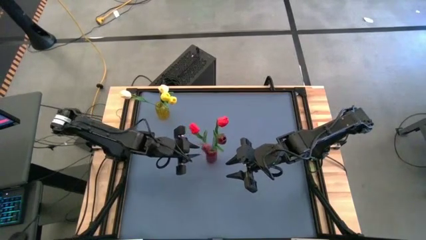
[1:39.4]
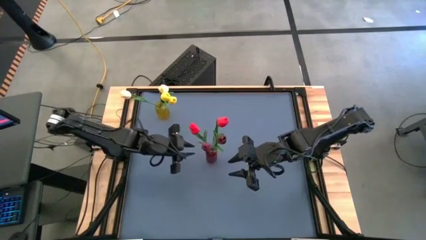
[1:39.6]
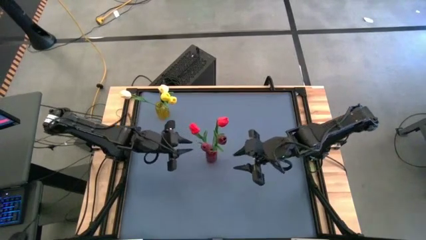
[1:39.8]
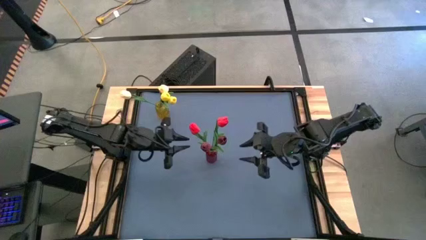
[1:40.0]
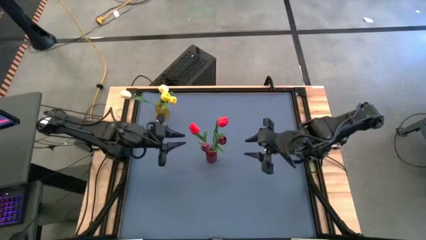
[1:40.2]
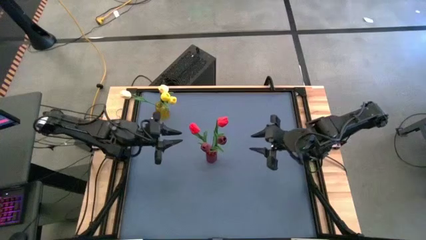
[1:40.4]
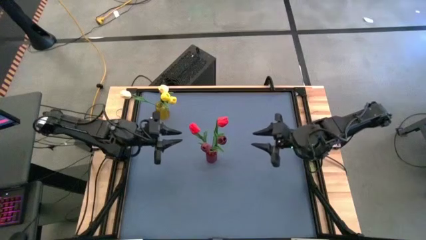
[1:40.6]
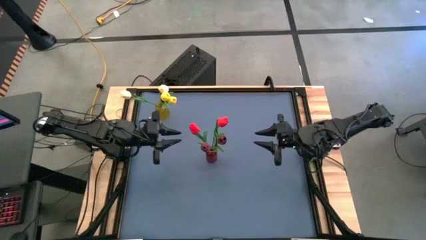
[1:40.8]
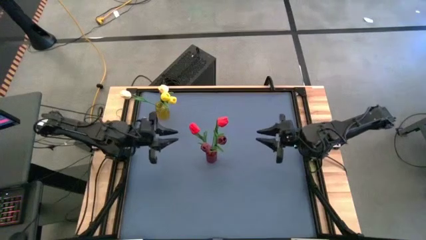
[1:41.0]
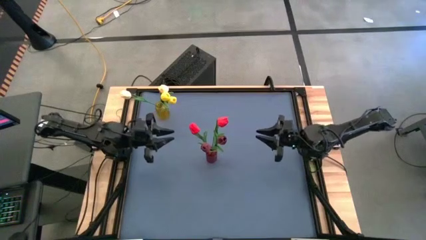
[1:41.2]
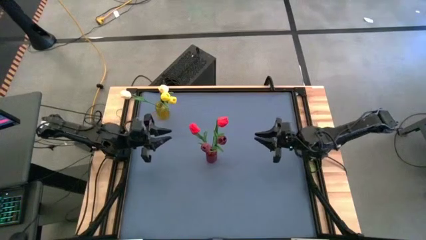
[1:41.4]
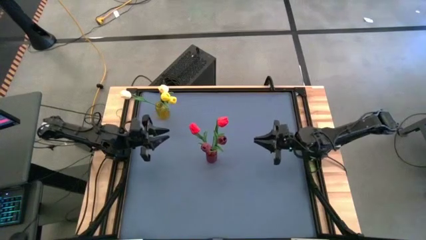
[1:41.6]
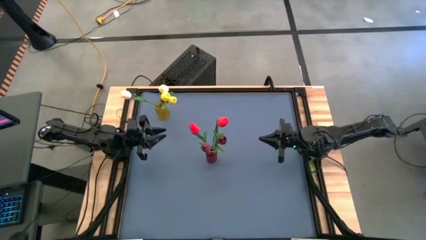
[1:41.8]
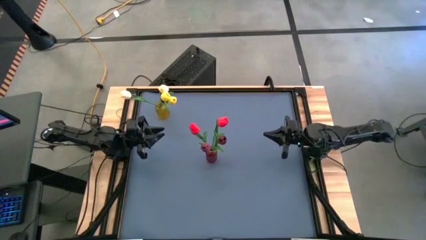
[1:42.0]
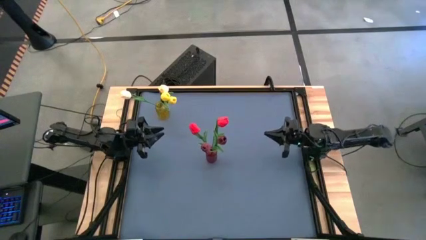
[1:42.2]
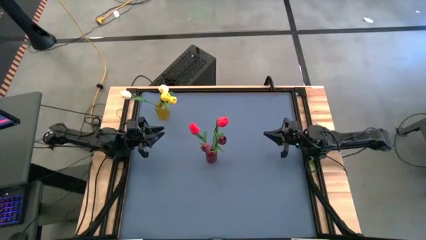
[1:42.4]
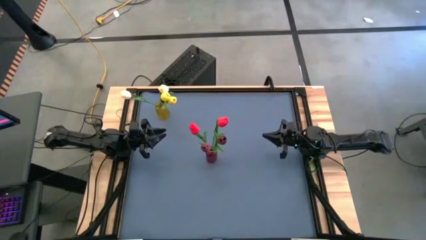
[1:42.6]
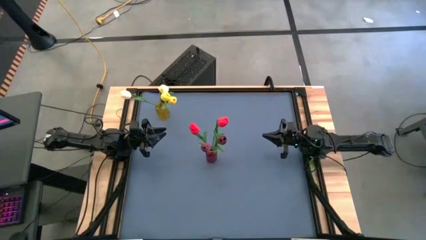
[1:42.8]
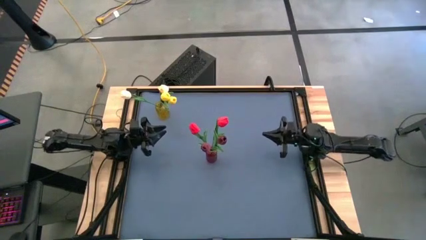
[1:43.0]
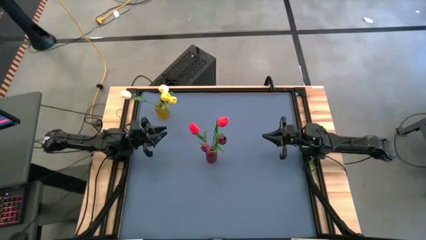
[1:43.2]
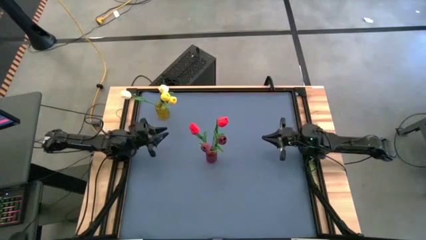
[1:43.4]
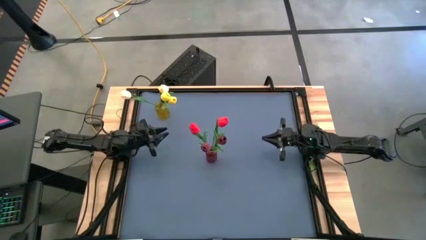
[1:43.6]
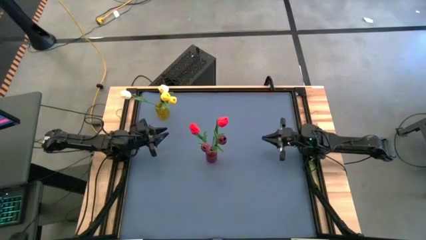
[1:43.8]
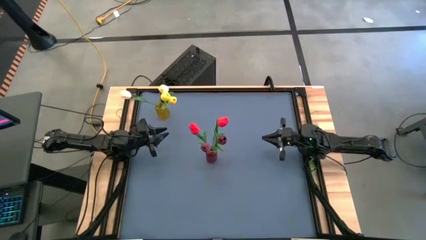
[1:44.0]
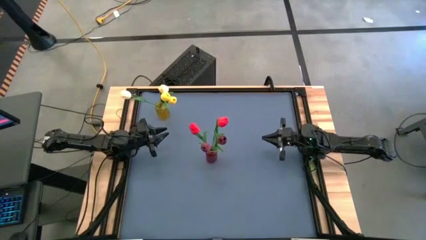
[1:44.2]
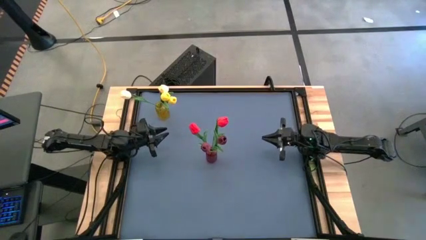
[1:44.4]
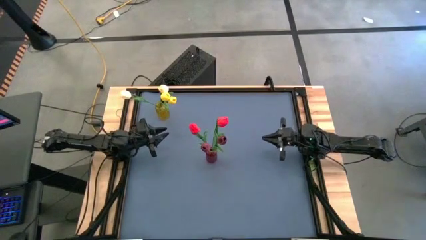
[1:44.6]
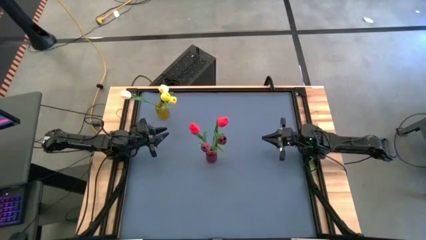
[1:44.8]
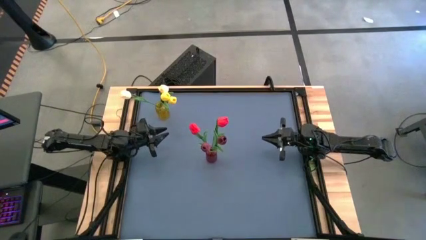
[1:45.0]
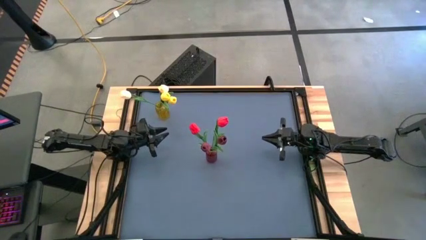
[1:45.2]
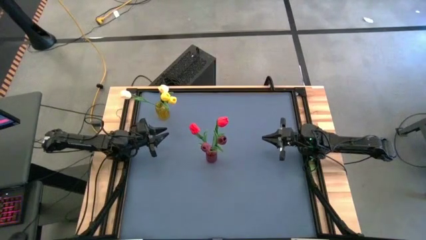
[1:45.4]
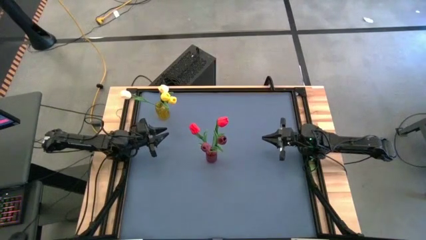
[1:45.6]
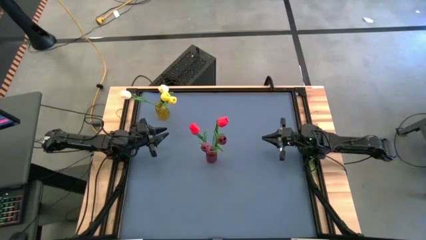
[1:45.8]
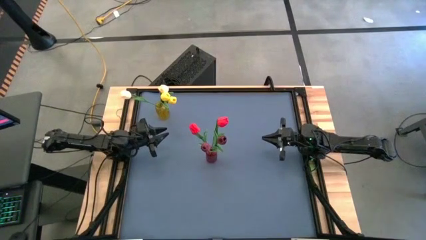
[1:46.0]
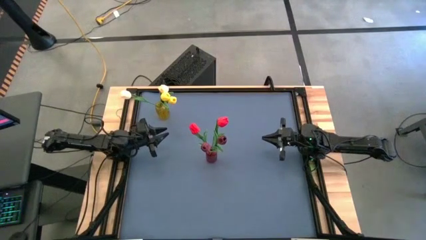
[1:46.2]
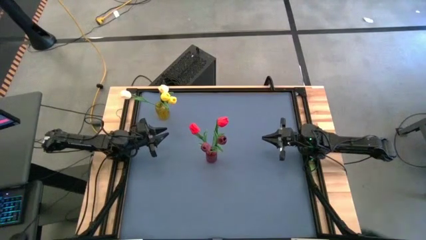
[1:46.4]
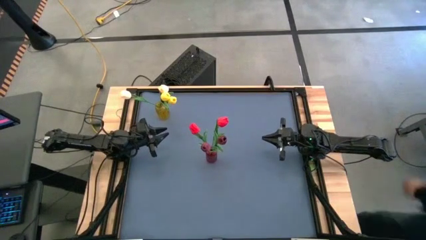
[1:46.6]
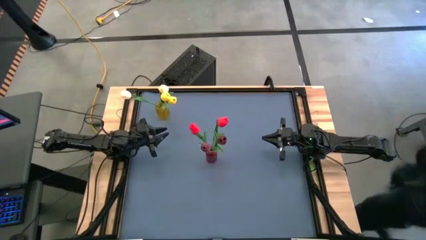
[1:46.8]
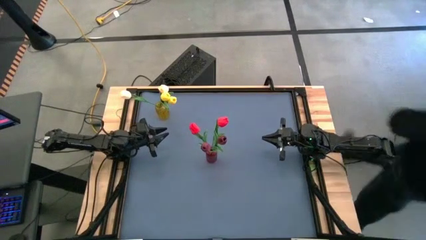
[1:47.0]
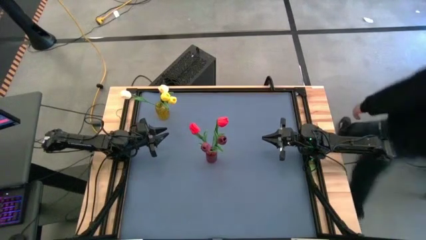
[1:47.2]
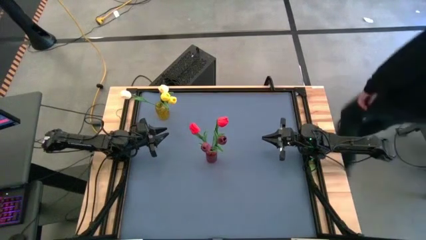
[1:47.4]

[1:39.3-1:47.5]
Task: Sort flowers into vase by color
Return to Home Position

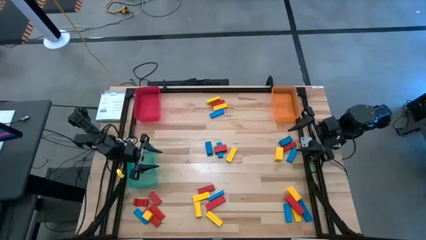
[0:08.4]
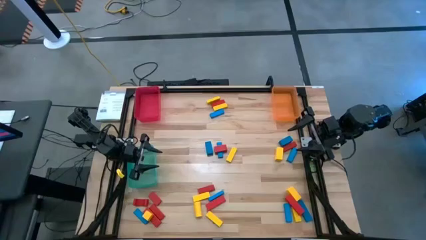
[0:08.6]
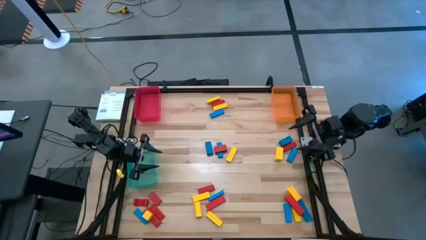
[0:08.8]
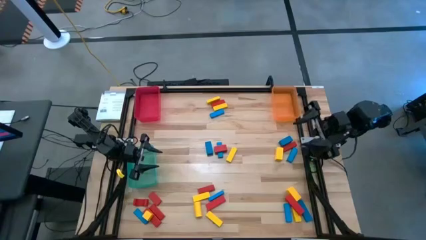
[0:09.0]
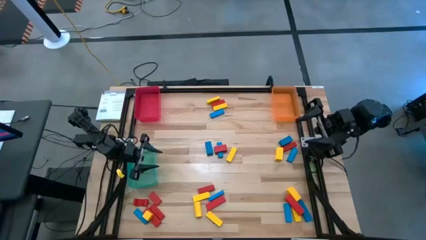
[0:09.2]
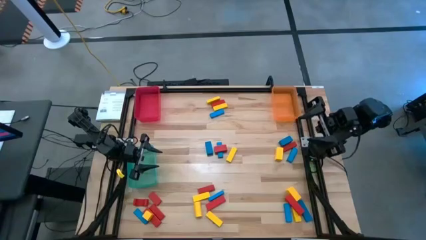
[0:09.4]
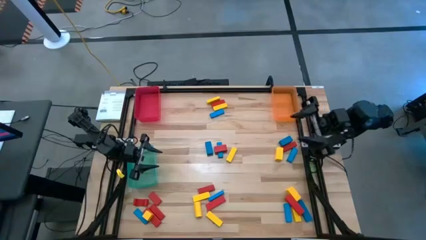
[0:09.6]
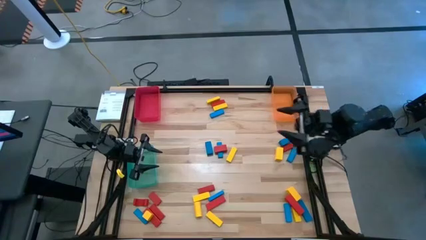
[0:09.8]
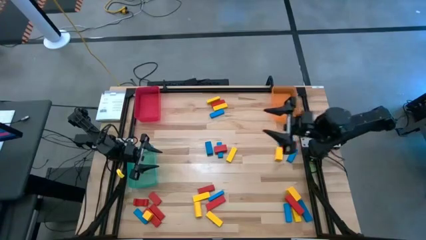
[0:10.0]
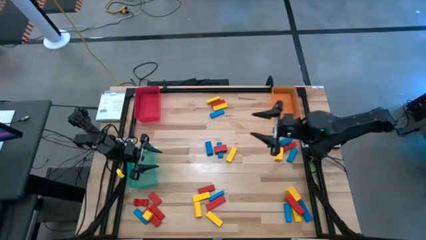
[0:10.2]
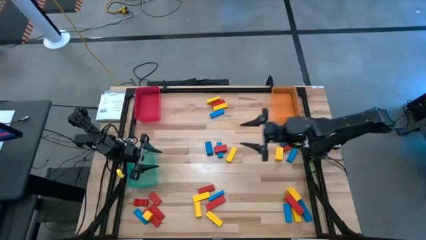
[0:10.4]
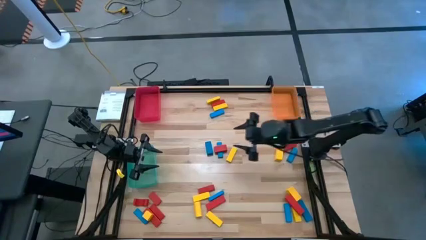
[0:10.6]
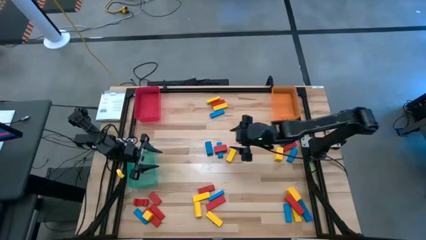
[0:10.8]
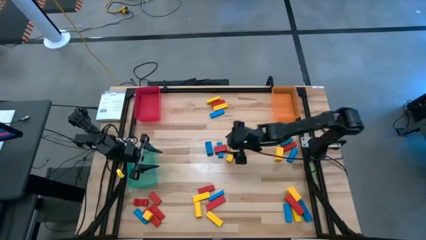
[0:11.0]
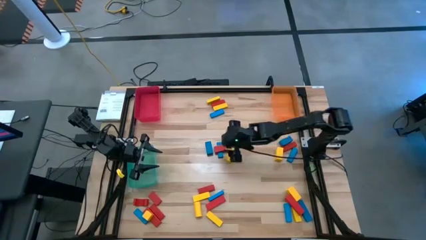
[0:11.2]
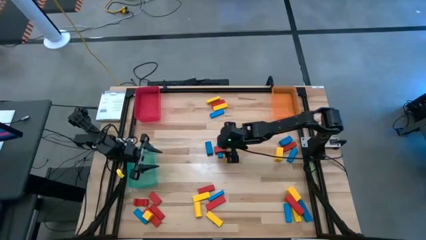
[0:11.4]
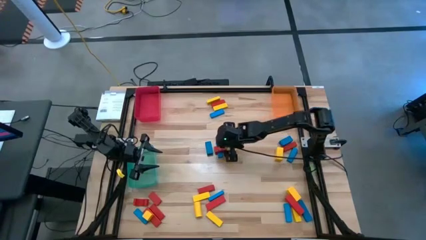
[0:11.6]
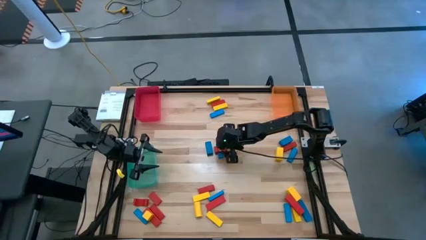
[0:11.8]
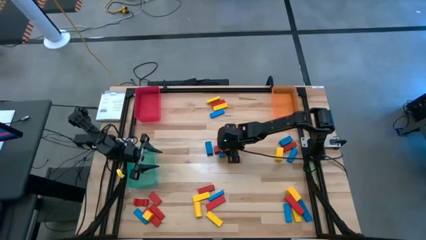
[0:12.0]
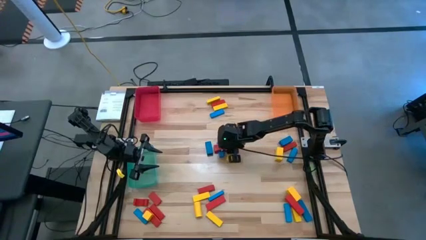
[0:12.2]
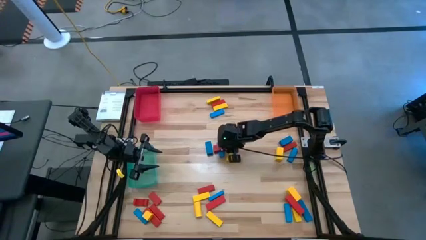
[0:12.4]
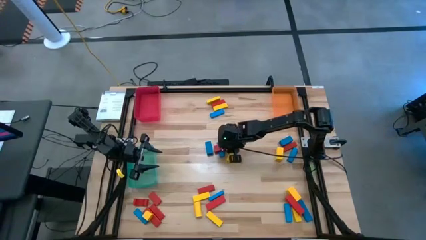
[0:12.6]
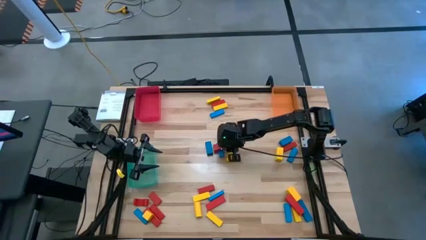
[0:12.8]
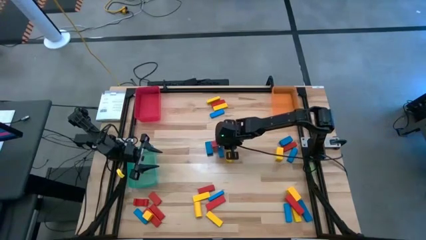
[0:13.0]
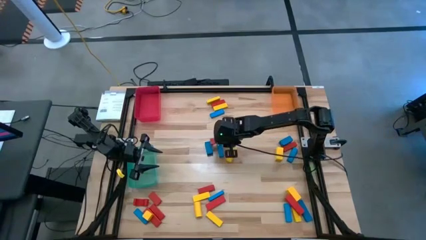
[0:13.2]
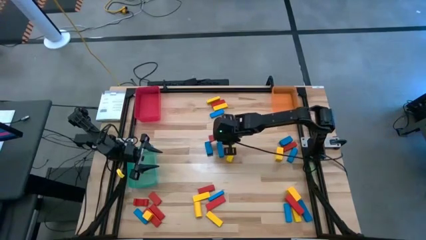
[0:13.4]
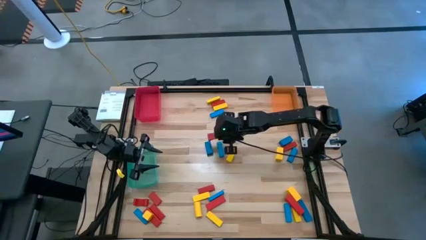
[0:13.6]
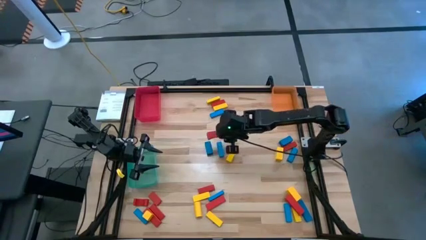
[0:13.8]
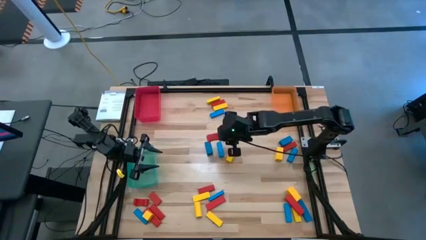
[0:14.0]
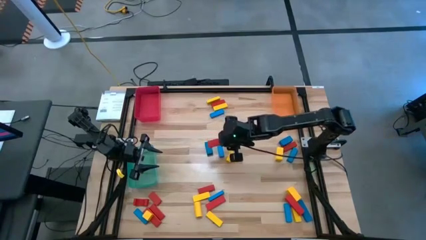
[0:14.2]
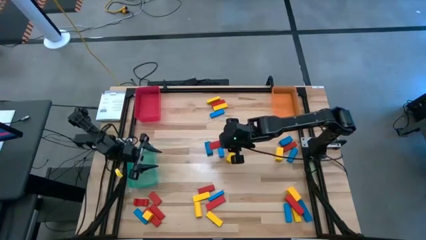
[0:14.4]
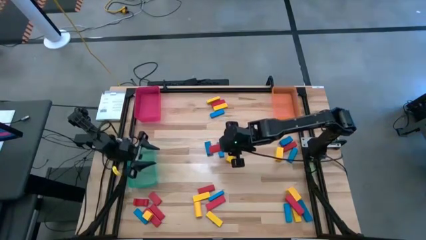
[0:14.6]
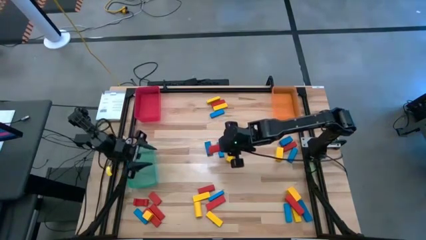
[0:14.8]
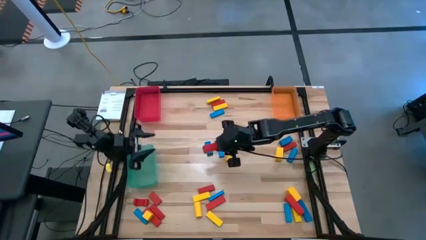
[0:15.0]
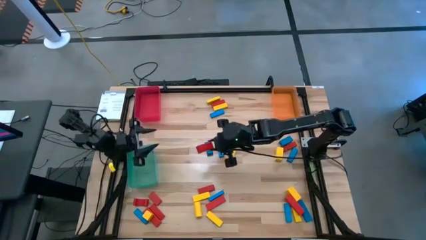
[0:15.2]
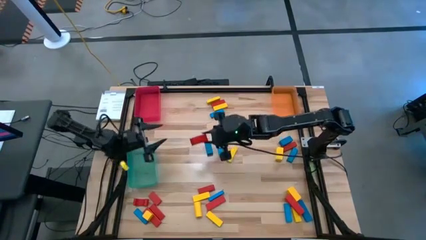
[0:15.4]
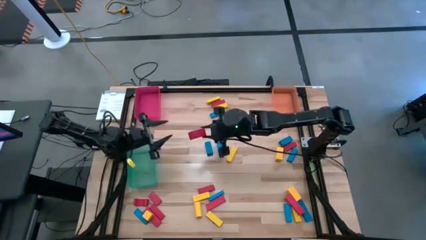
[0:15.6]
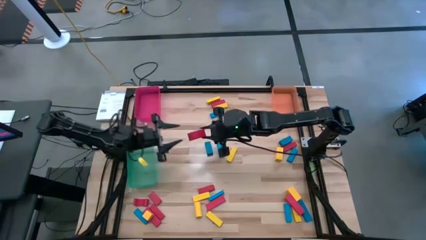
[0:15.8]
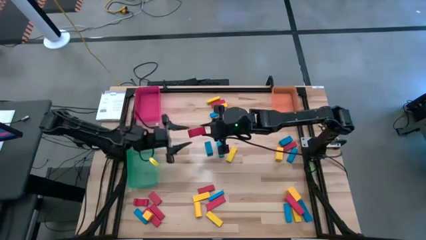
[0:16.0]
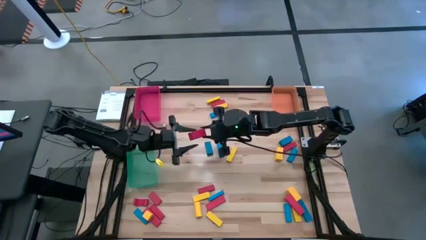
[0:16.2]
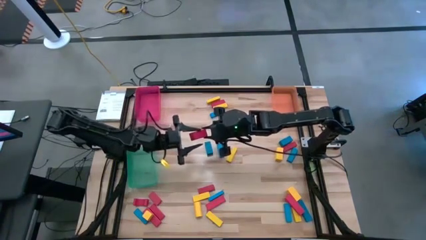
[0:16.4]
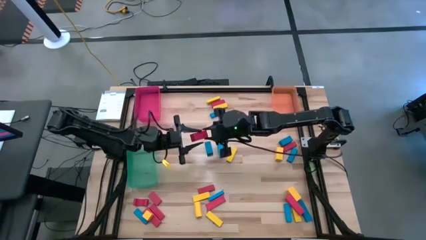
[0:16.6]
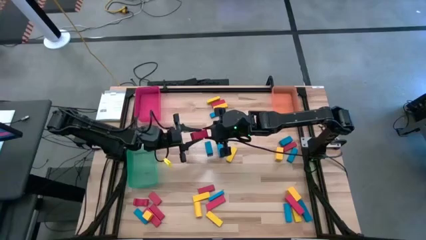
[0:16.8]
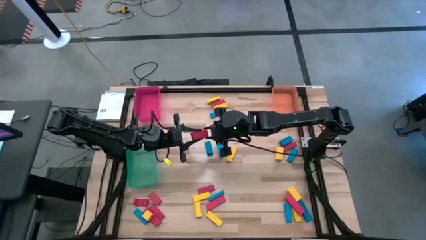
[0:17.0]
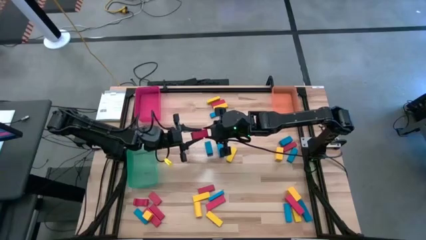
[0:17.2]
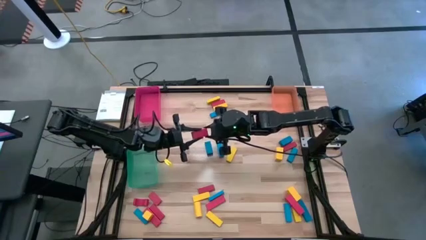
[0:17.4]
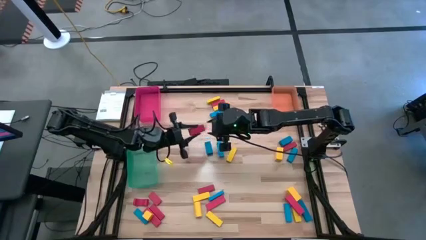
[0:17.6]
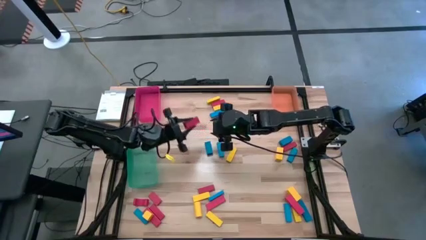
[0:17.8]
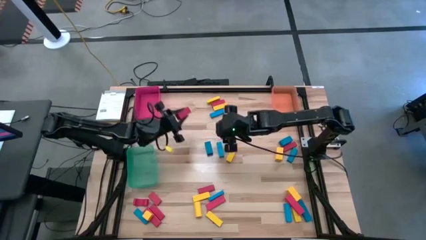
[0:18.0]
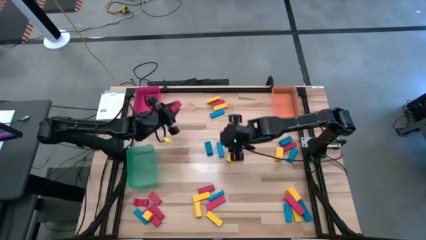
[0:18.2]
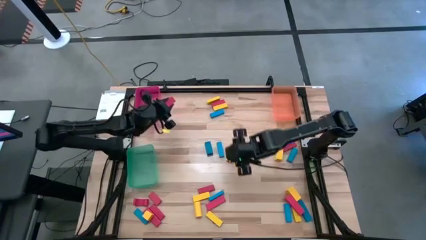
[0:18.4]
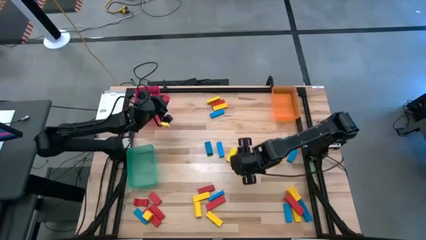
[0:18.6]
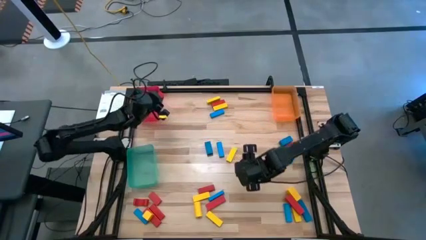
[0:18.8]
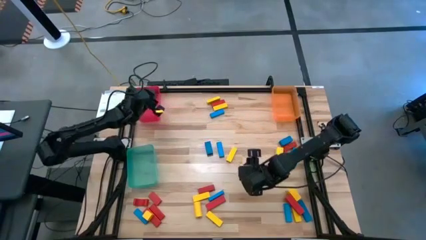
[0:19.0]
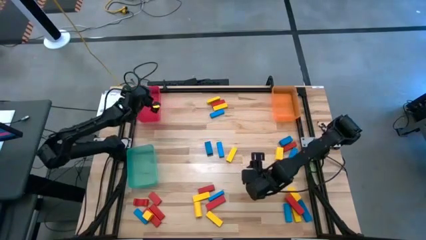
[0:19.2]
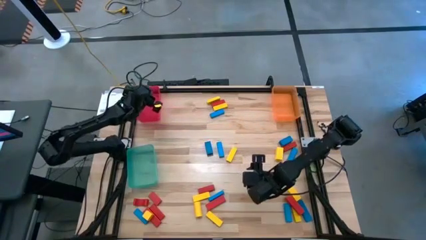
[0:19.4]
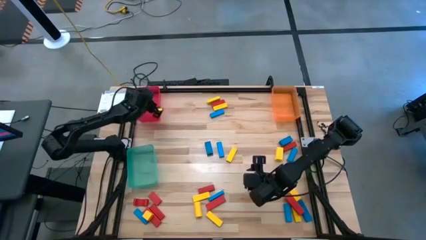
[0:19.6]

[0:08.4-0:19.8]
Task: Sort blocks
Put the red block into the red bin
